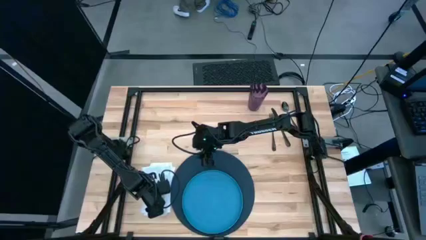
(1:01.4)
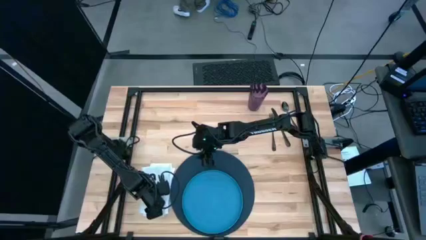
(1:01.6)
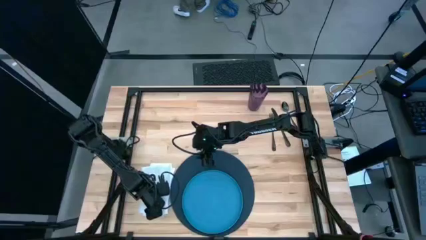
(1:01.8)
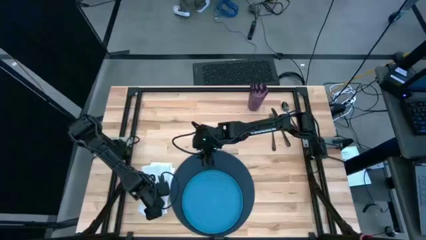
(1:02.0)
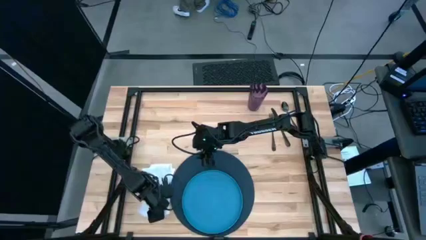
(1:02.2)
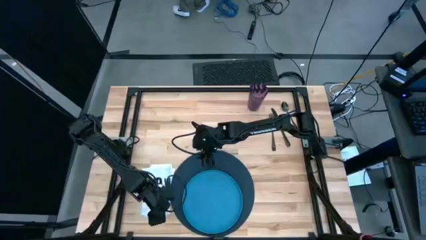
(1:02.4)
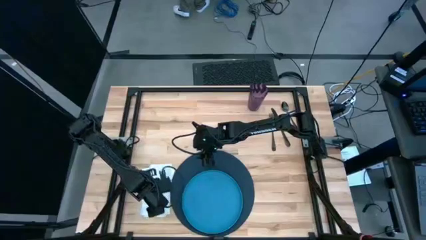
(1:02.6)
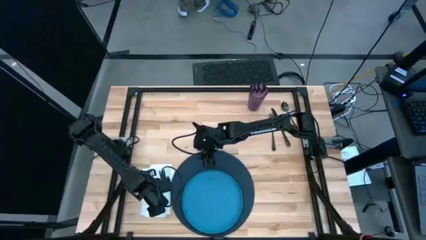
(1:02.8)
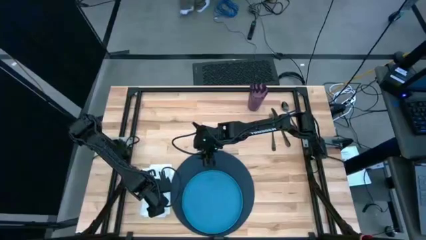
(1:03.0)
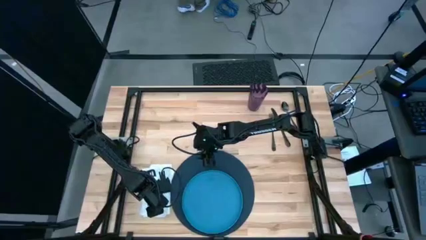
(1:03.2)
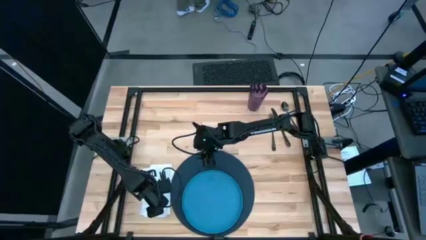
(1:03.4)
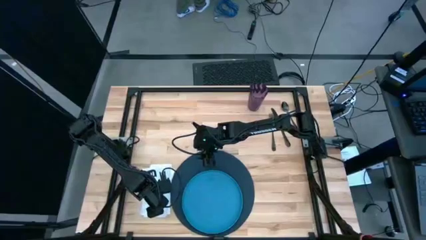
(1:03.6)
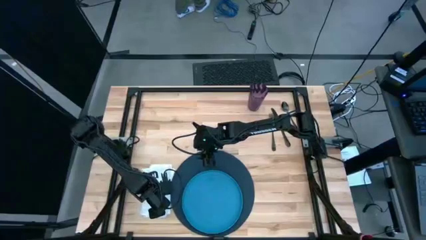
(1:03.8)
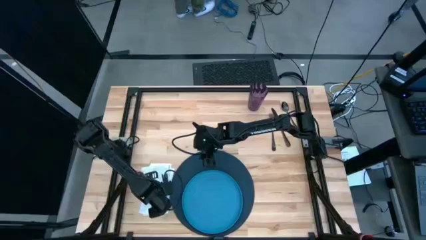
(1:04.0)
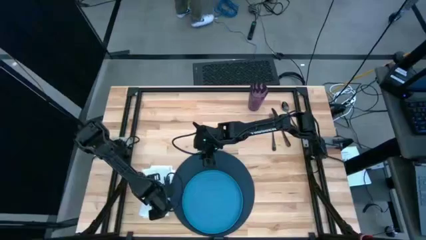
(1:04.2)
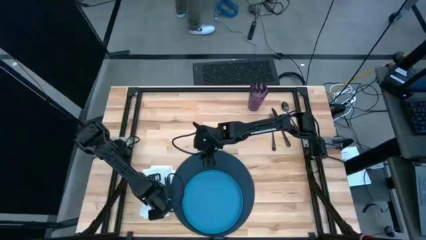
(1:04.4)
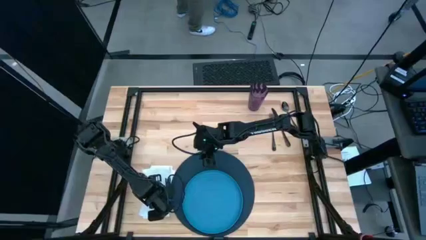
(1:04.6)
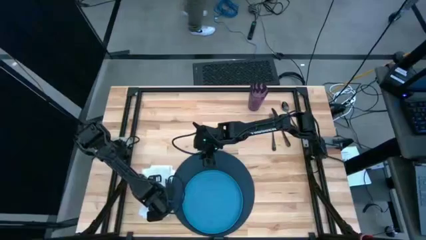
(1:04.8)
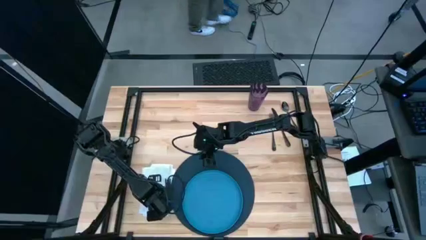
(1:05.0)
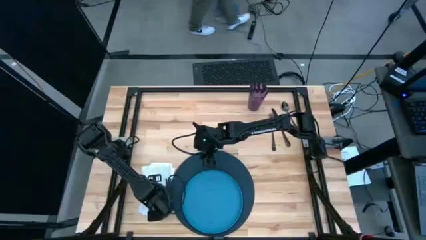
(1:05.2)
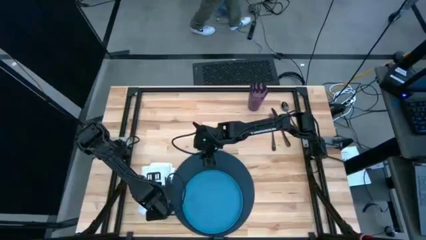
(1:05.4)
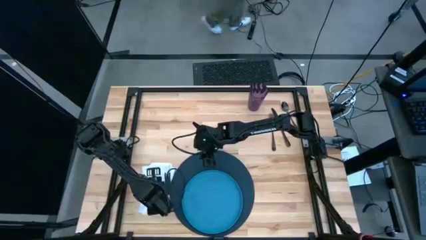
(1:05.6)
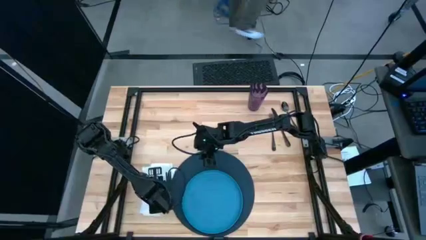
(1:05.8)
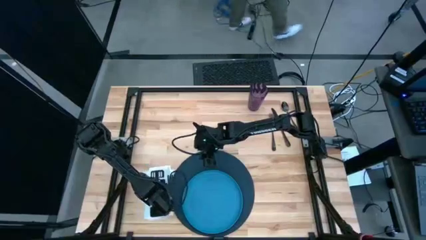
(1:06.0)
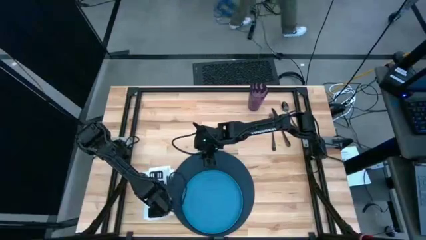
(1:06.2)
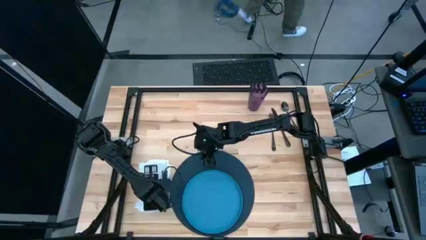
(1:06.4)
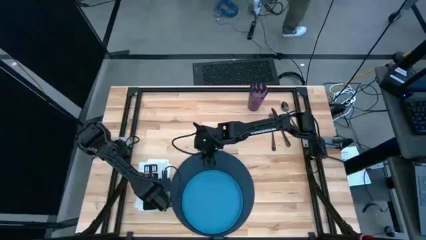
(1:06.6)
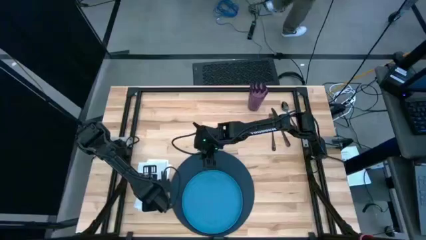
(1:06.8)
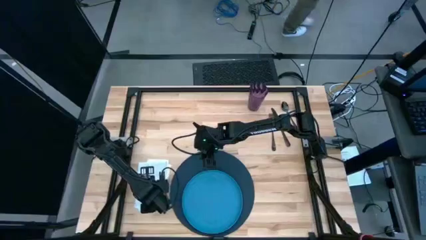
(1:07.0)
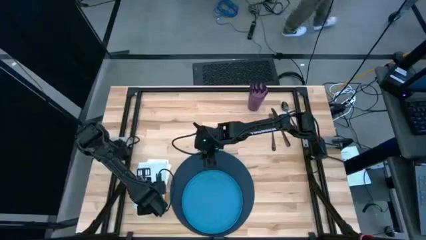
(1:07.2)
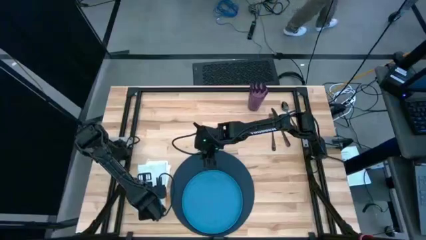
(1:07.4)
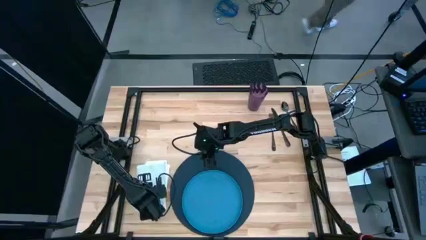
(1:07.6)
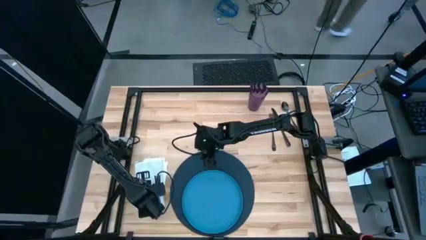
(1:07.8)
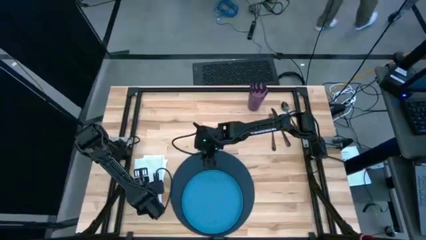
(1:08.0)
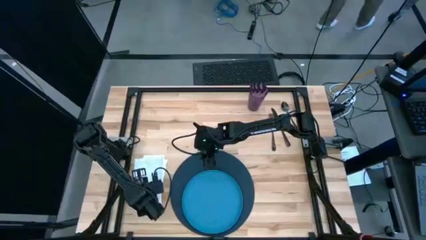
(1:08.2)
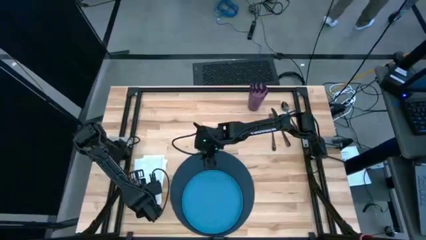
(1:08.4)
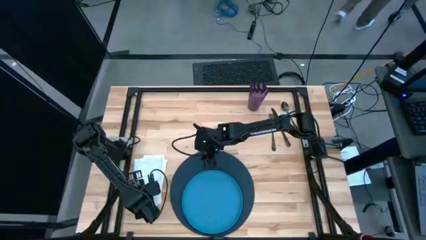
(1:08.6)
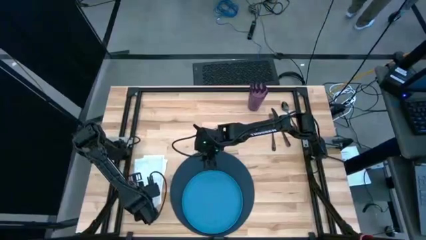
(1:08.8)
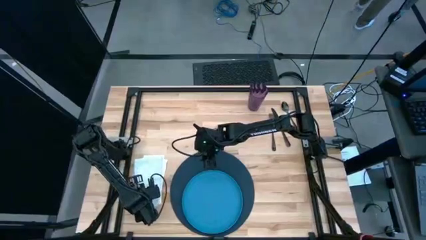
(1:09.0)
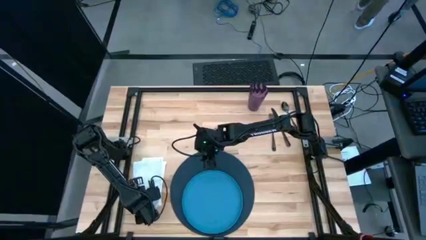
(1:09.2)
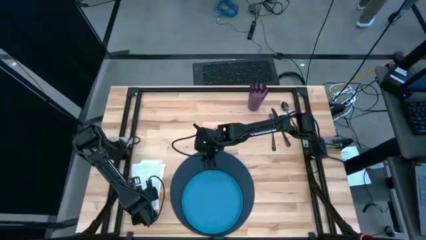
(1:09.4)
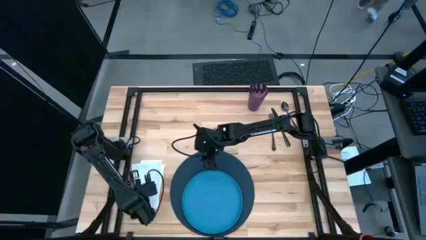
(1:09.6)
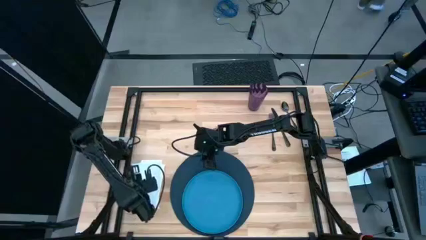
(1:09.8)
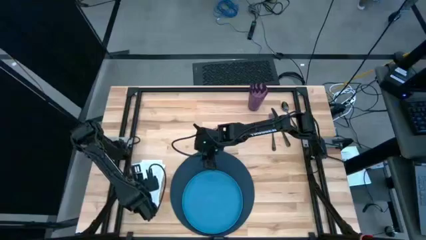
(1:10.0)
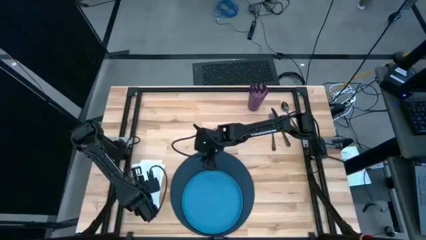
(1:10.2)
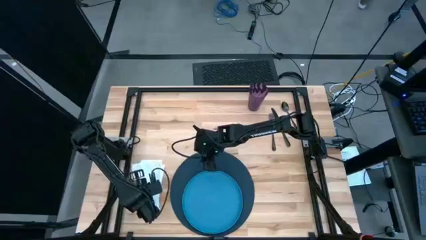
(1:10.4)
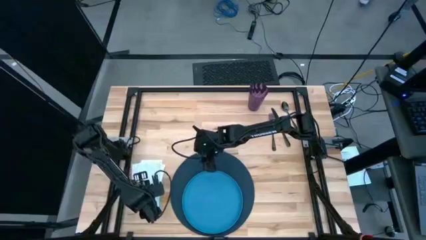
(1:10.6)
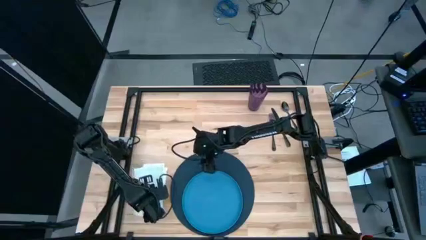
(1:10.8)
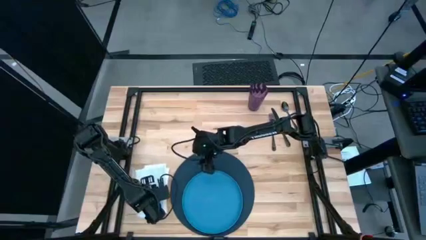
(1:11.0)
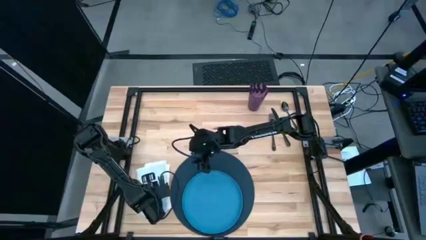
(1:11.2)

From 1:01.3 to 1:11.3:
Task: Set table place
Move the table napkin beside the placemat

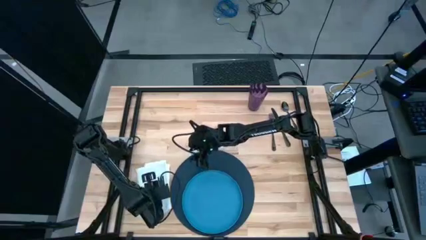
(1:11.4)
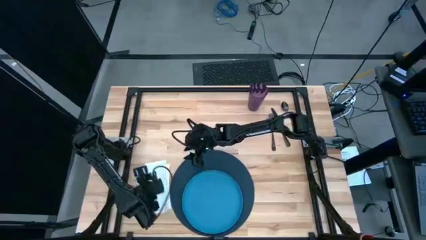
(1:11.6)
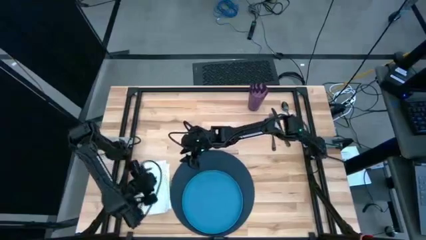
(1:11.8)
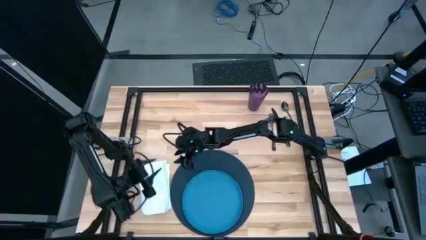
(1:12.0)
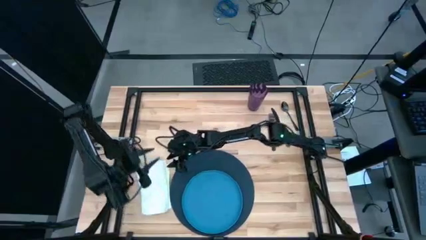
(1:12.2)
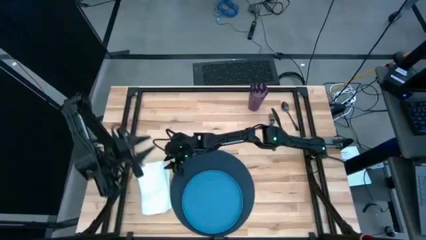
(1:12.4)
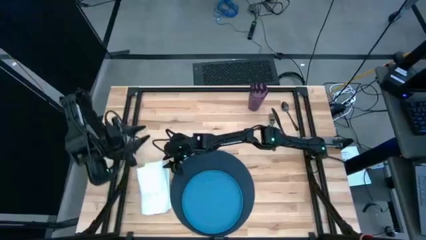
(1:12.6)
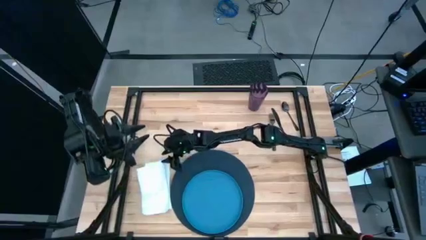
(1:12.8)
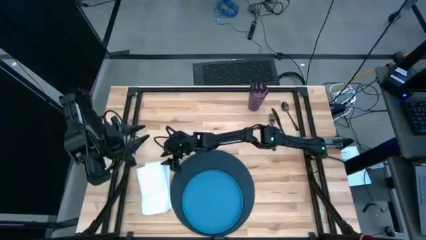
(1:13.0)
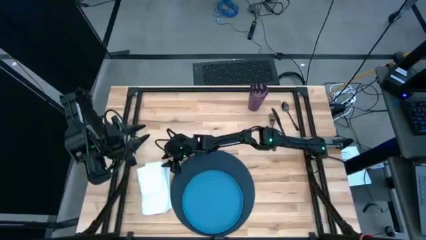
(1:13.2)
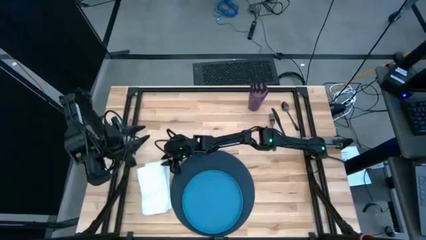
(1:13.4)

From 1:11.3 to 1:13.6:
Adjust the table napkin

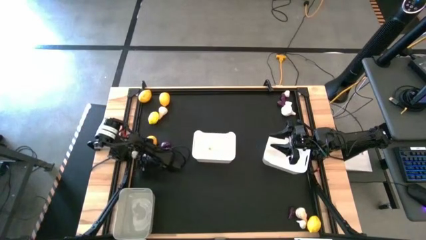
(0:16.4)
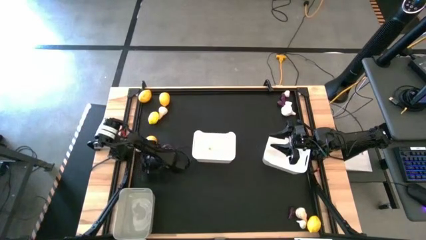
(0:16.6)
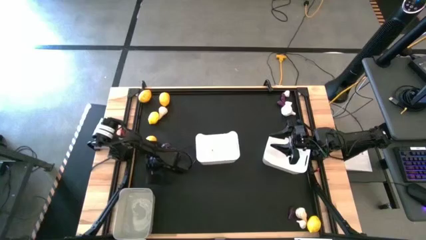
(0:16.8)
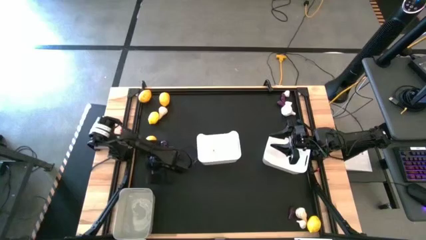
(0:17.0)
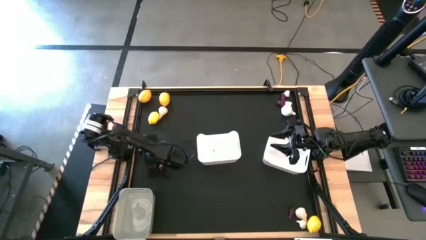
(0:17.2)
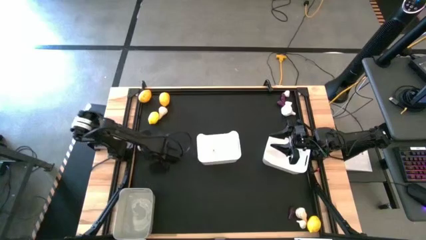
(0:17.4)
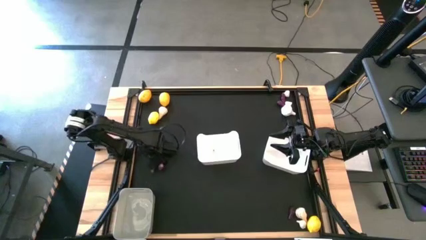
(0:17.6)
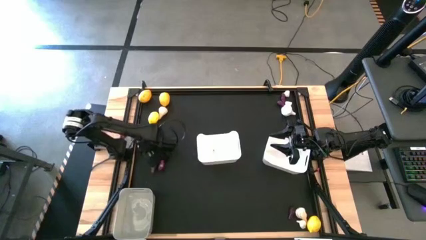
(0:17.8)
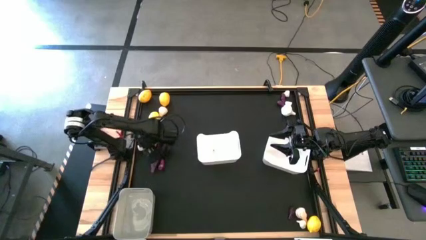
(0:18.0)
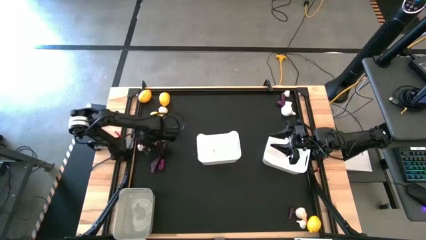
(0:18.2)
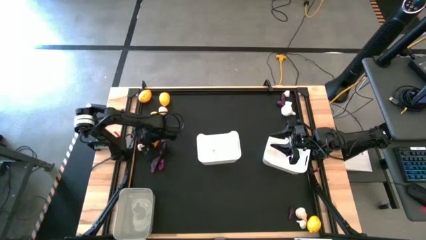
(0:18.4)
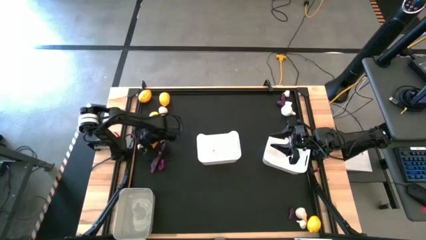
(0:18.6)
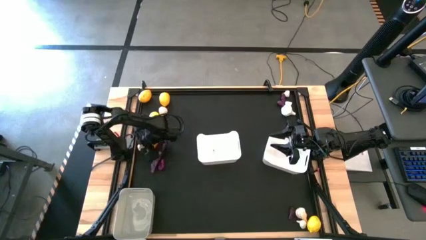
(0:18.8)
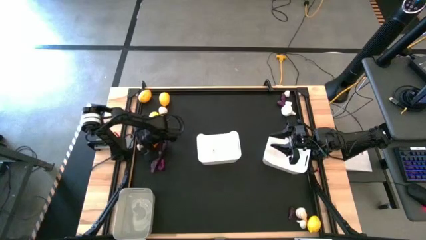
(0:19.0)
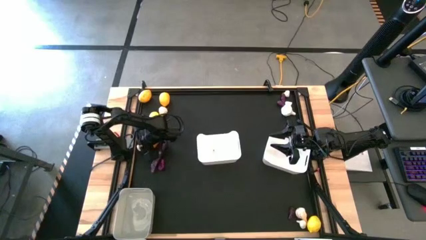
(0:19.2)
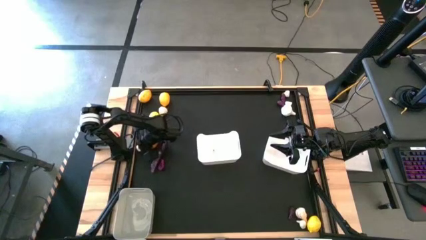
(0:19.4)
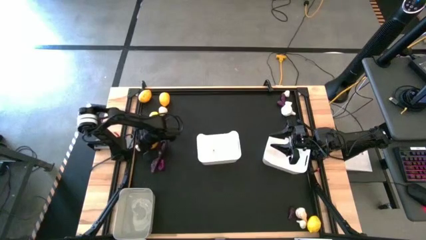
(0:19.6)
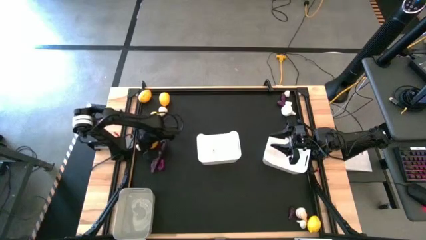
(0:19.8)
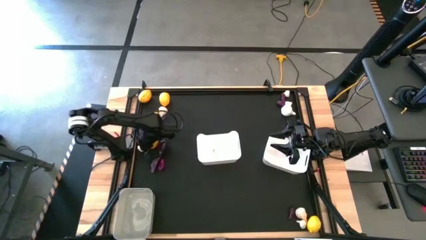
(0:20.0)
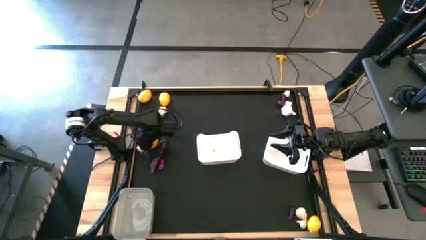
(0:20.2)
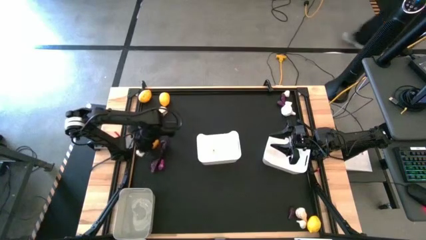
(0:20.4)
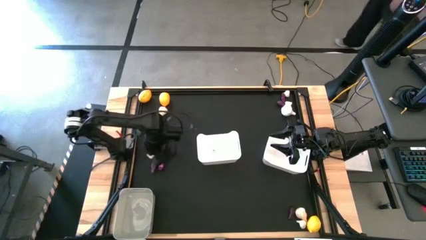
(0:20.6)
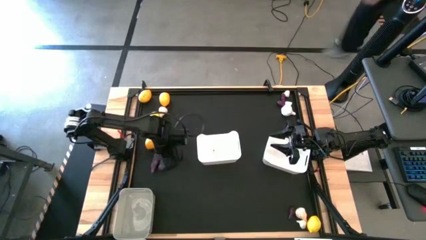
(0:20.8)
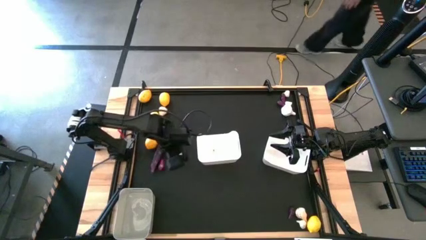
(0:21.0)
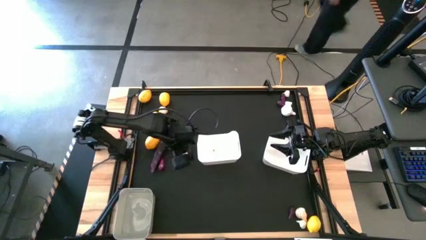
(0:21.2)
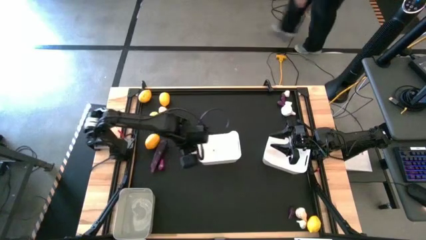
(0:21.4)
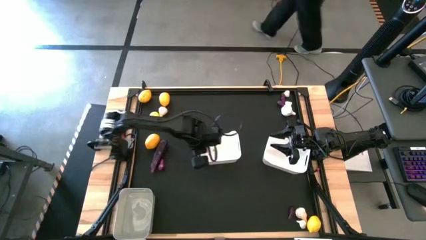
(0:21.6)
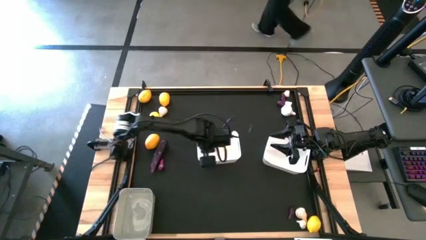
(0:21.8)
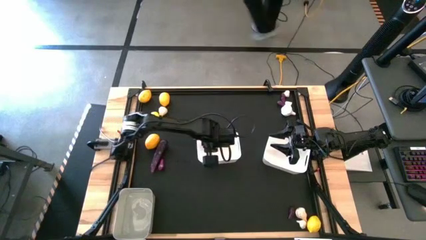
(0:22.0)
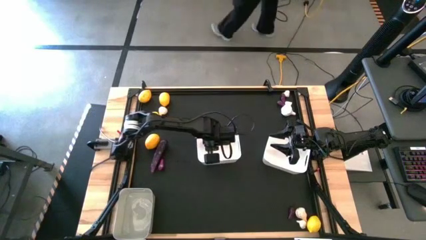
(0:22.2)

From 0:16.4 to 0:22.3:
Task: Sort produce into baskets
Put the garlic into the left white bin
